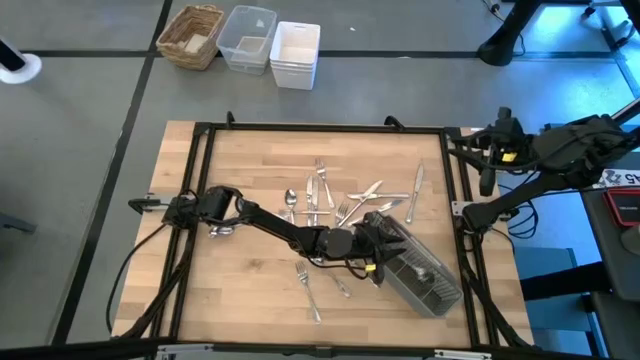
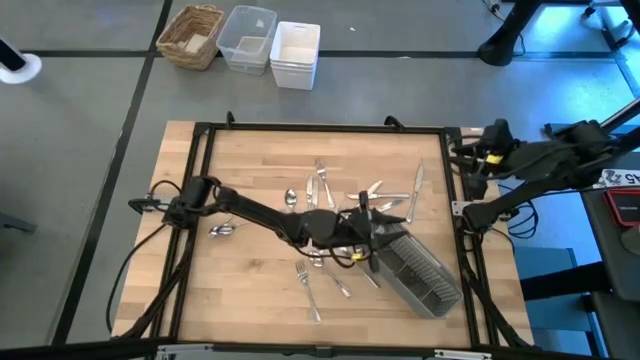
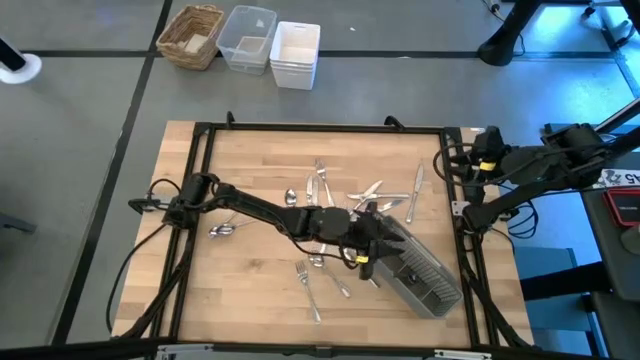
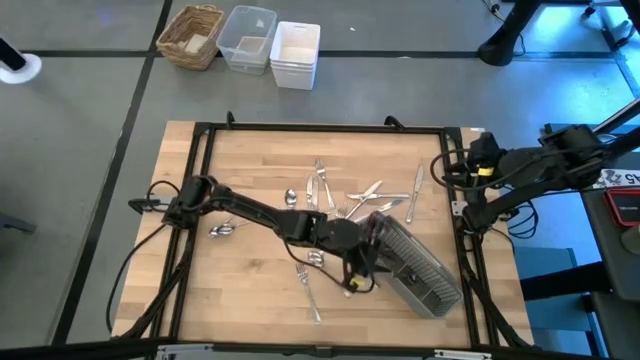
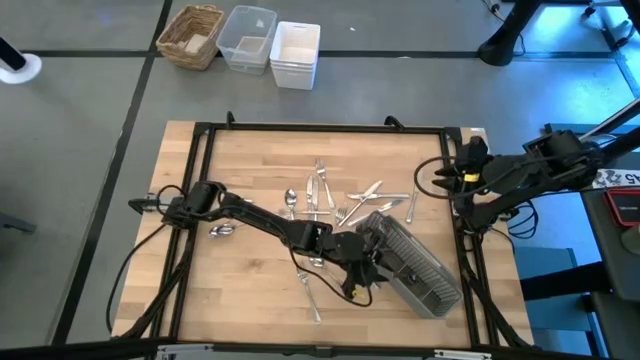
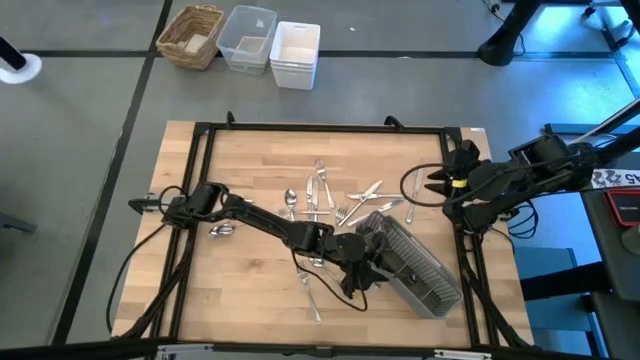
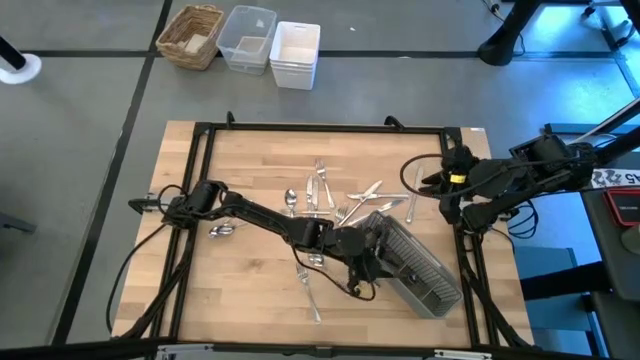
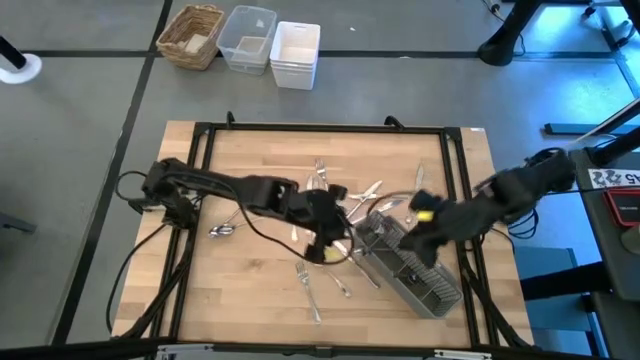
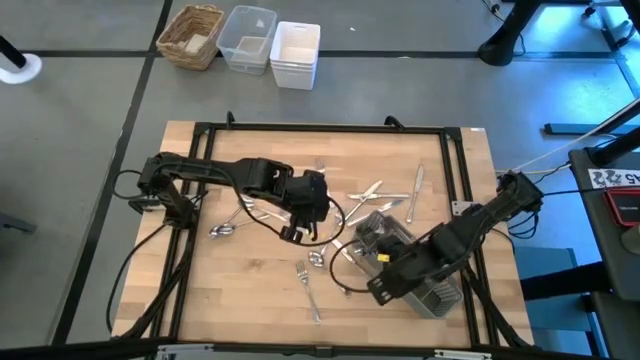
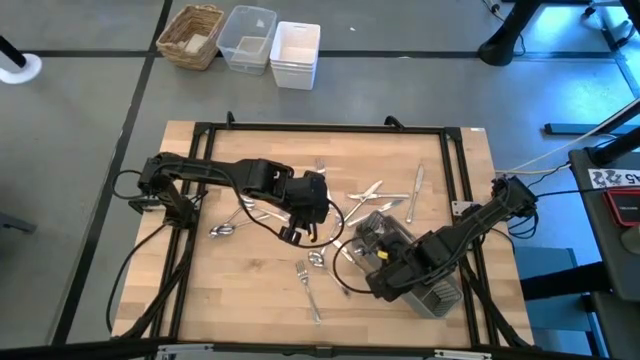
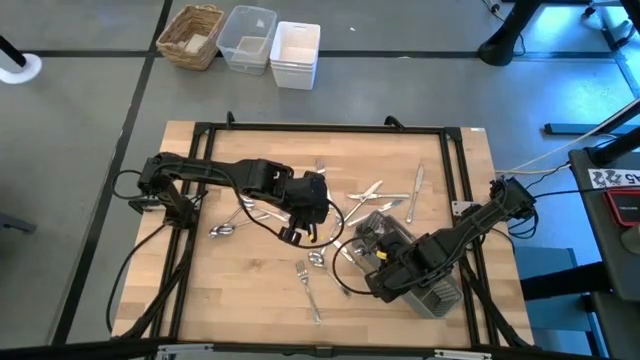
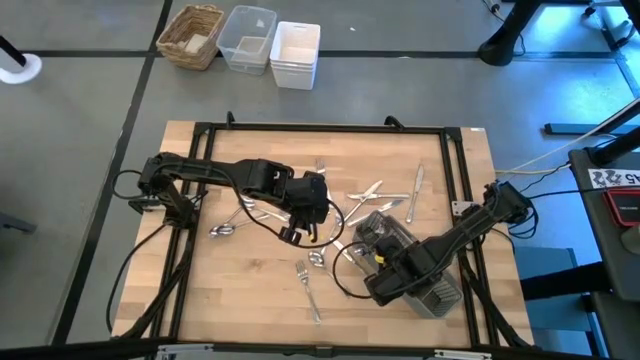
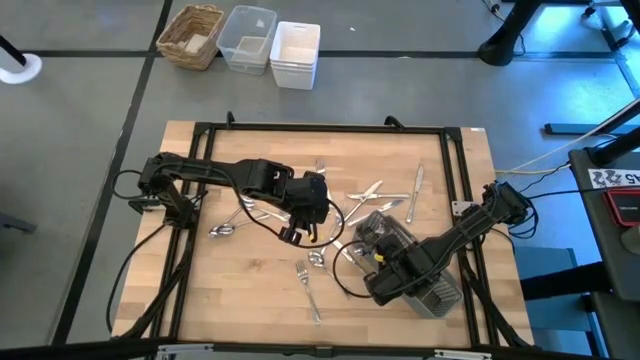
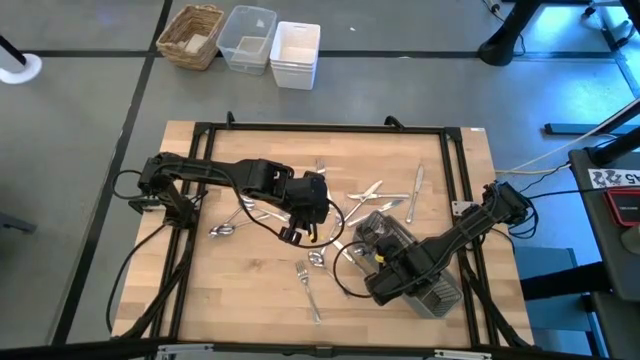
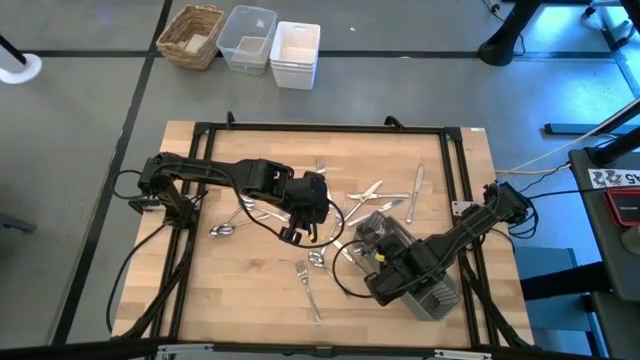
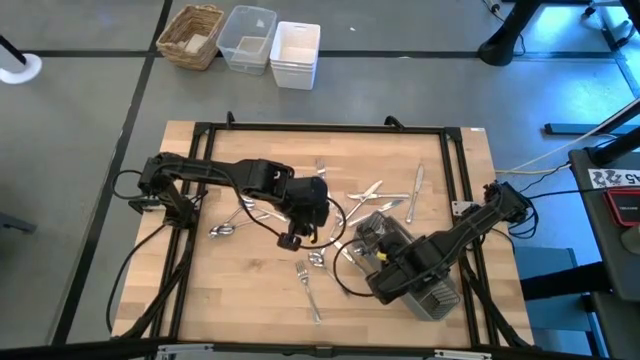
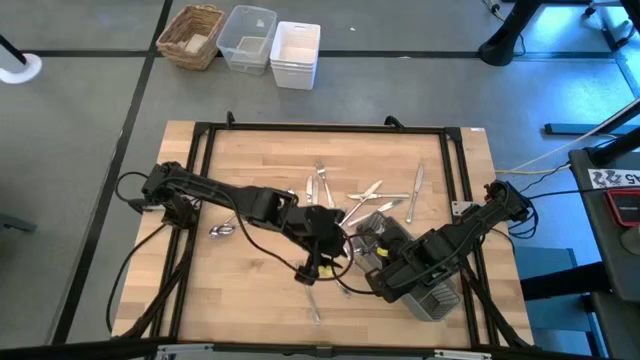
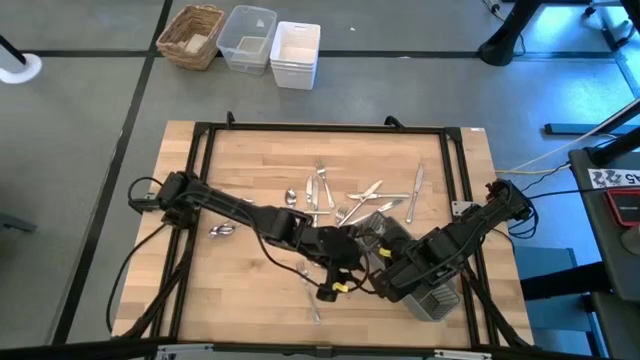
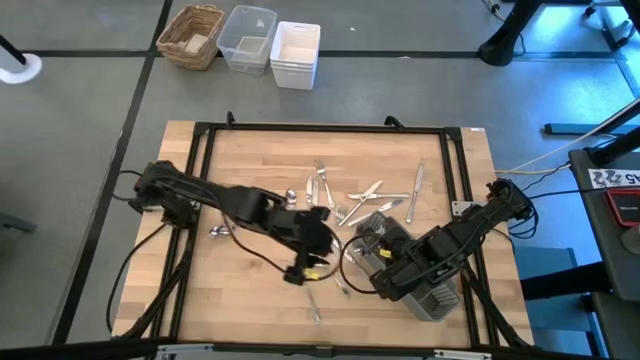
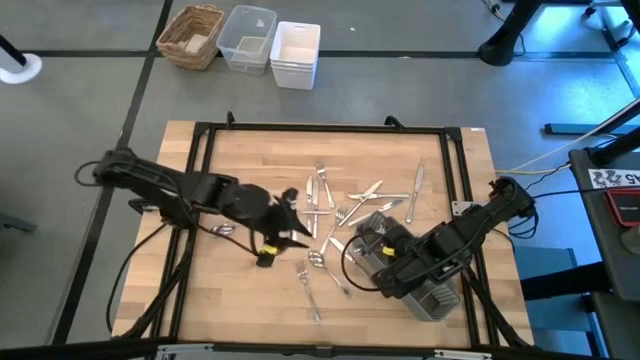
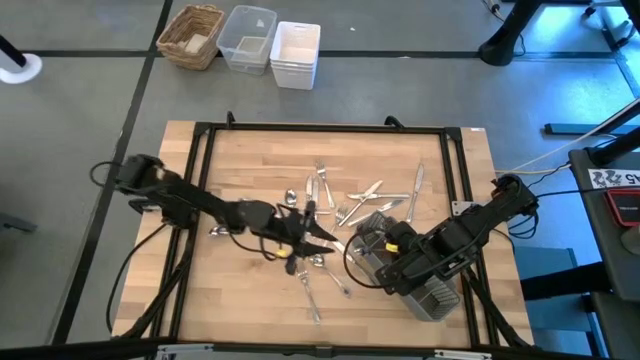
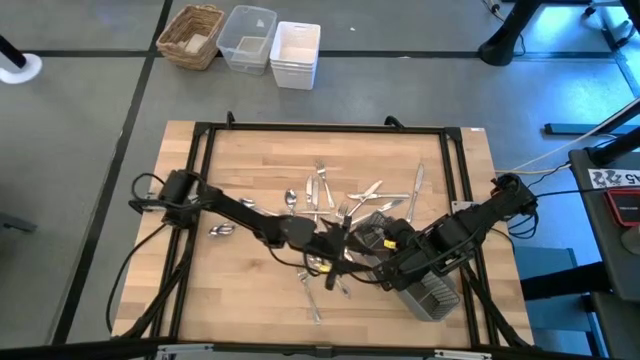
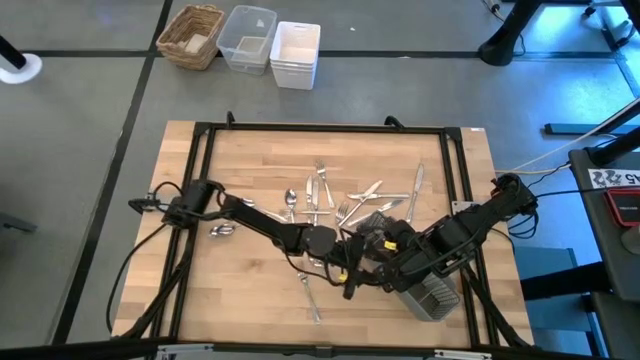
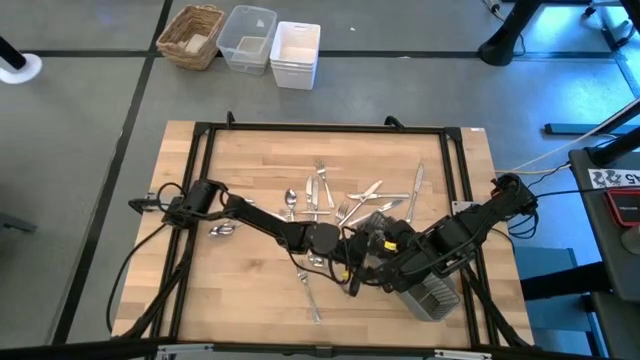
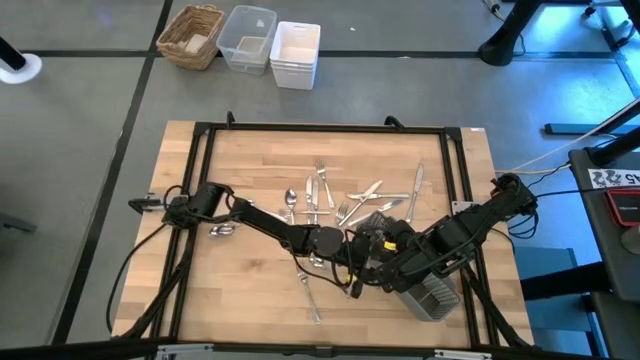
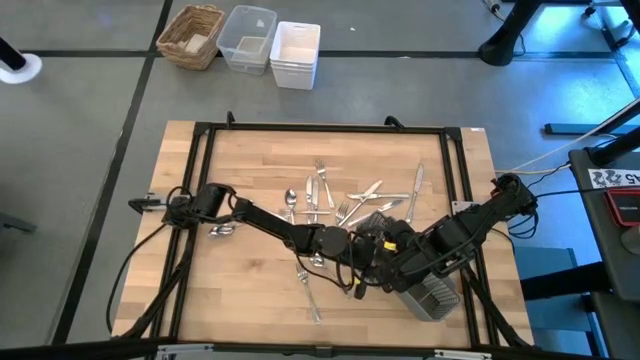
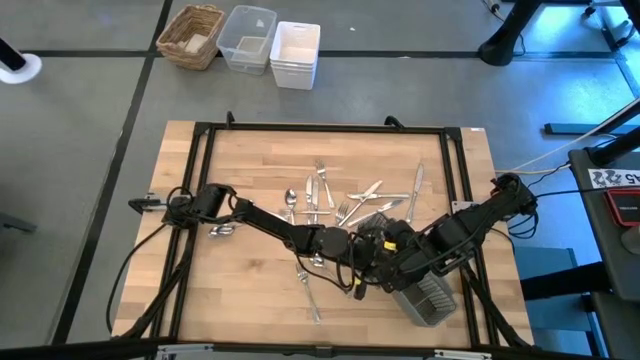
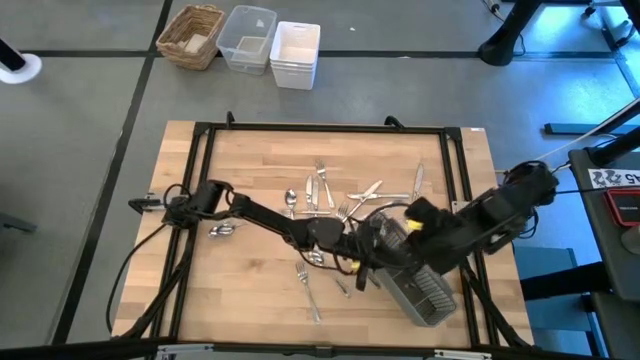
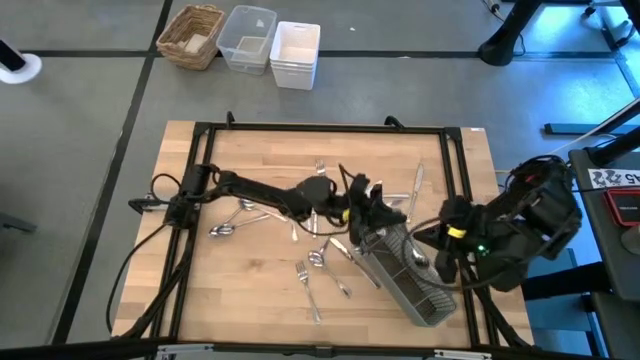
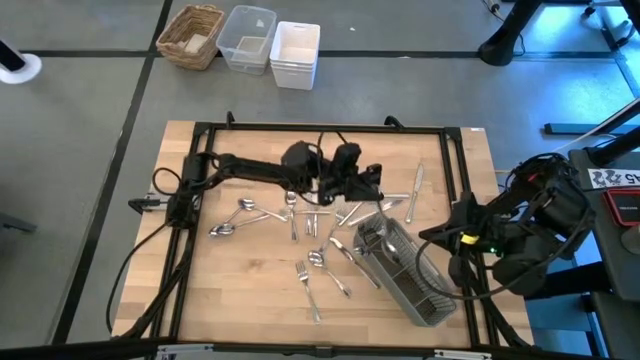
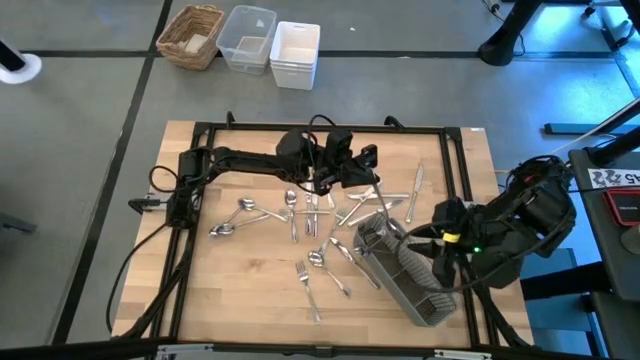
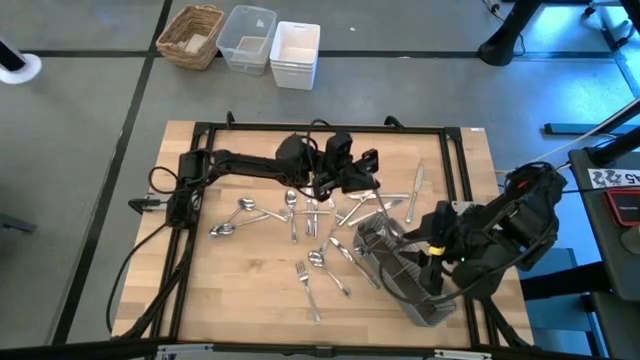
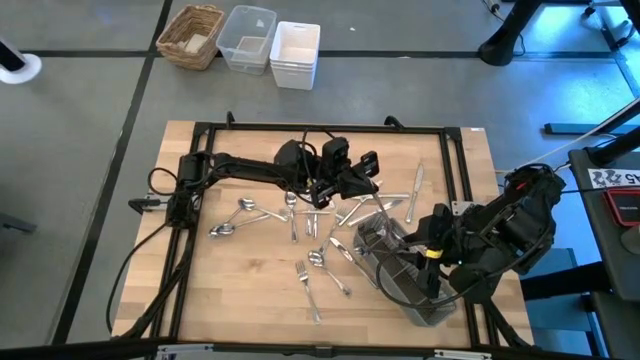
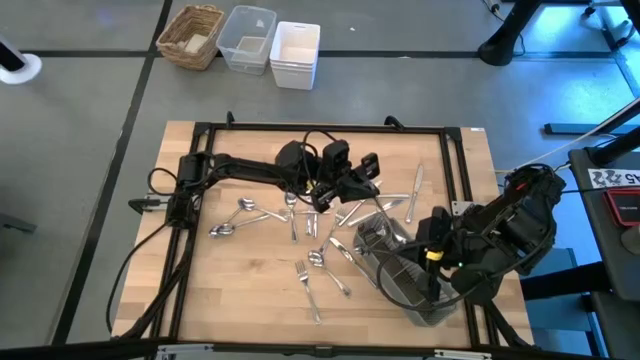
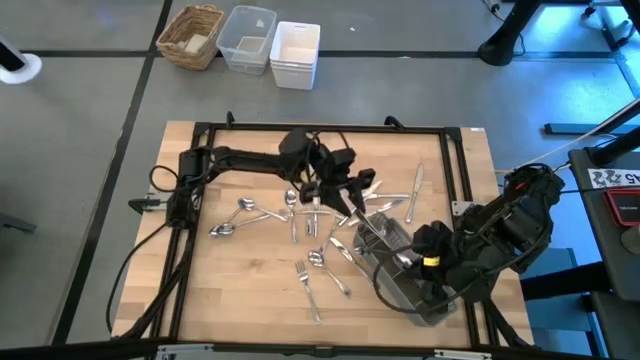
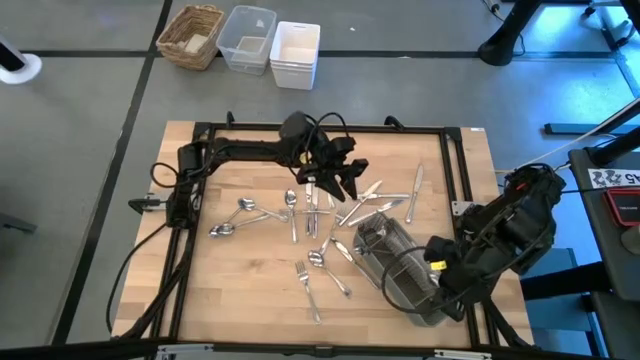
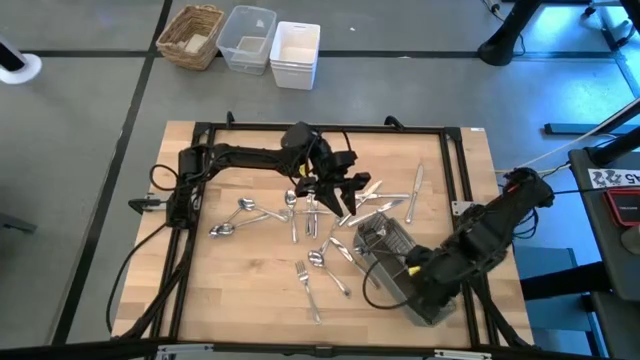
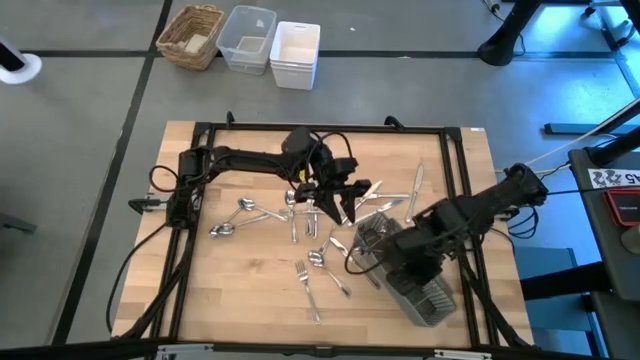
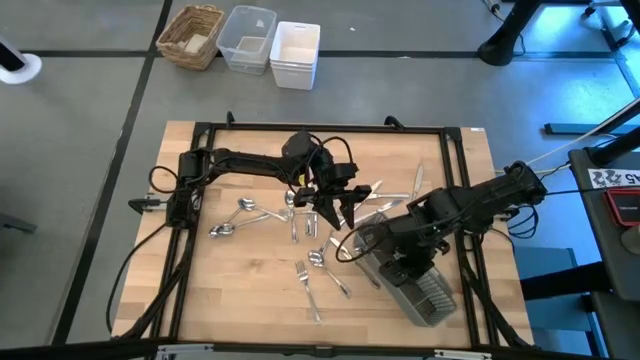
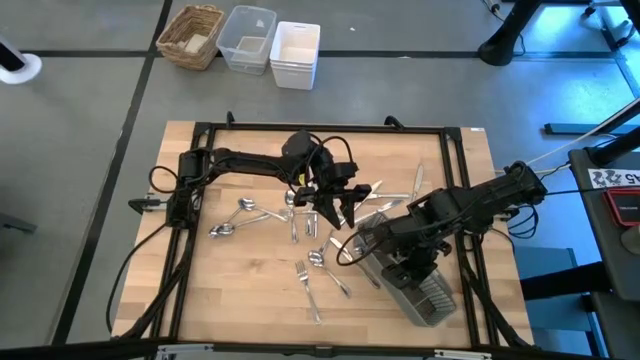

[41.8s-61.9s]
Task: Sort silverware
Put the silver spoon into the gray silverware basket
